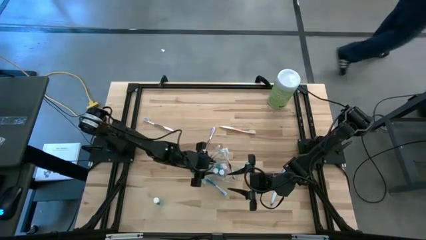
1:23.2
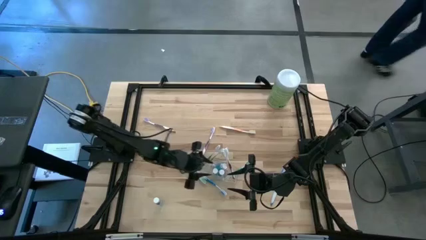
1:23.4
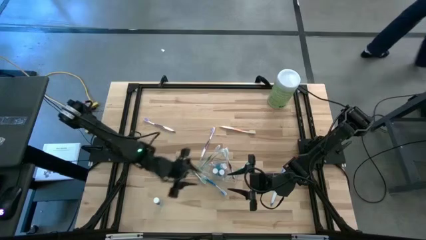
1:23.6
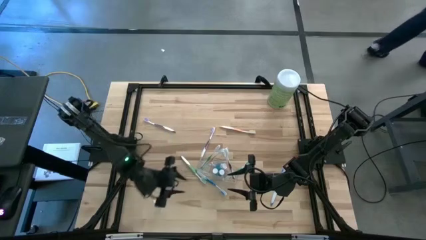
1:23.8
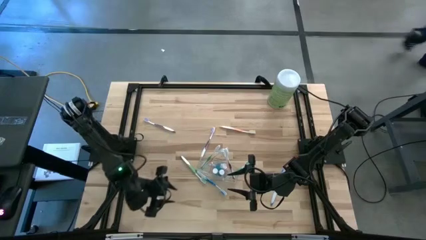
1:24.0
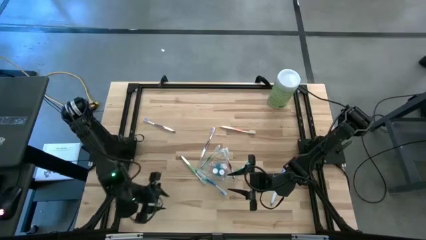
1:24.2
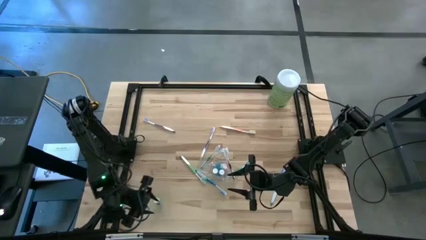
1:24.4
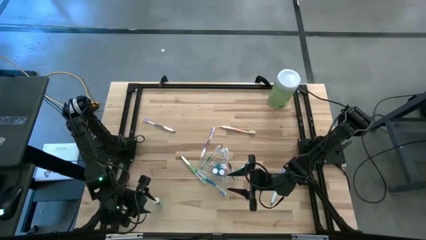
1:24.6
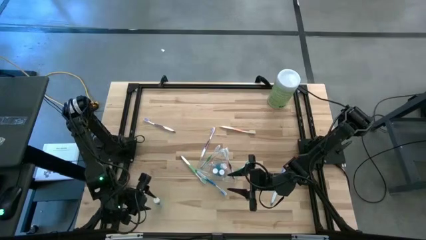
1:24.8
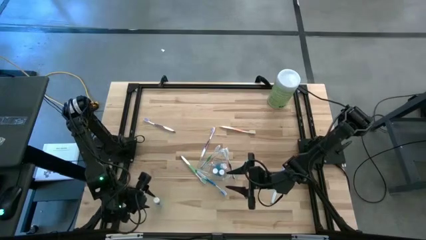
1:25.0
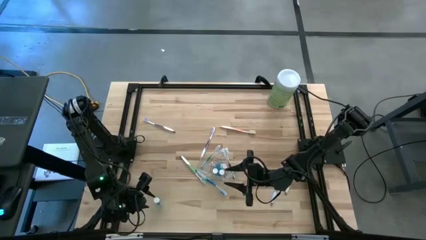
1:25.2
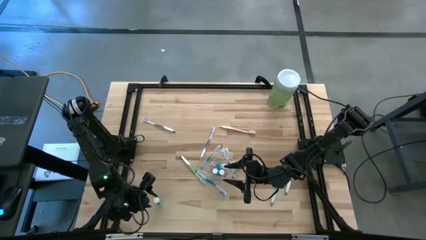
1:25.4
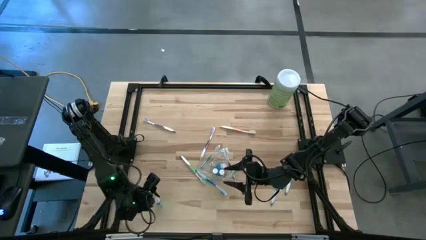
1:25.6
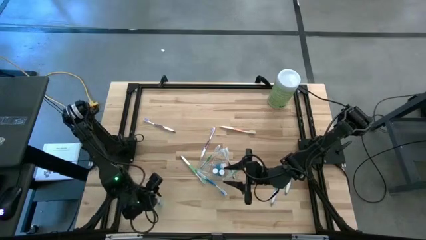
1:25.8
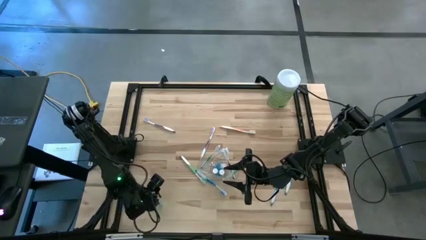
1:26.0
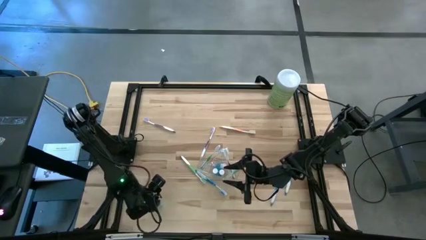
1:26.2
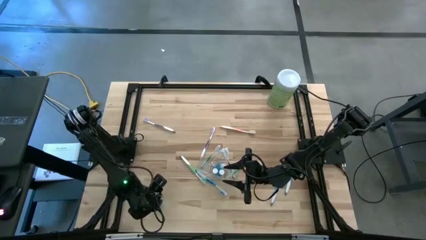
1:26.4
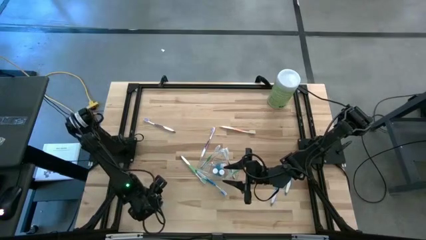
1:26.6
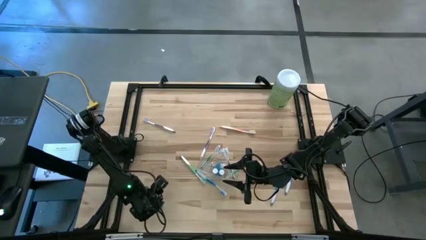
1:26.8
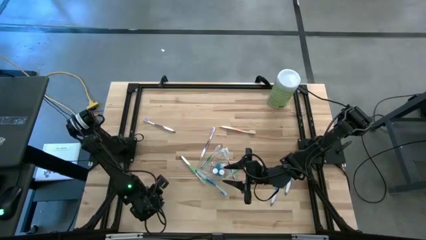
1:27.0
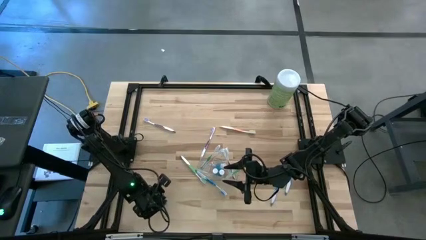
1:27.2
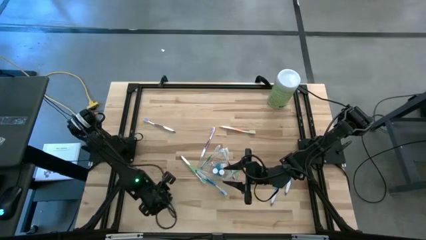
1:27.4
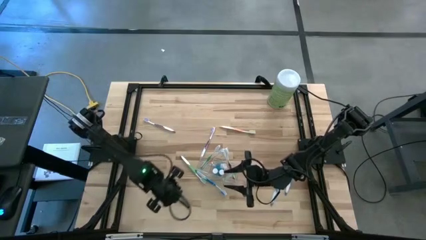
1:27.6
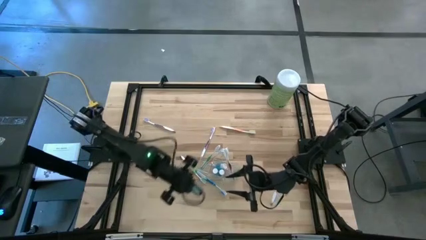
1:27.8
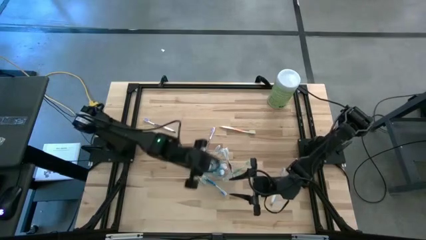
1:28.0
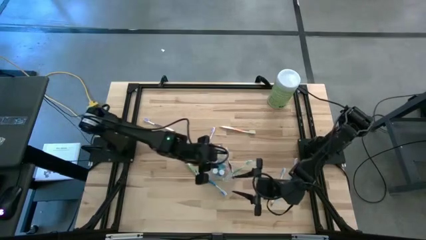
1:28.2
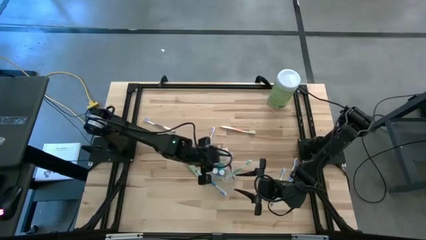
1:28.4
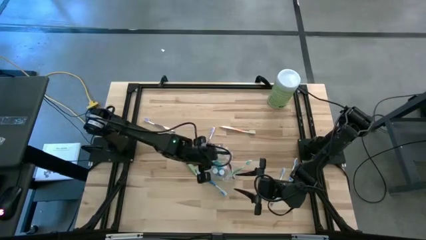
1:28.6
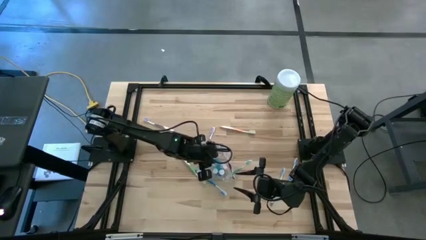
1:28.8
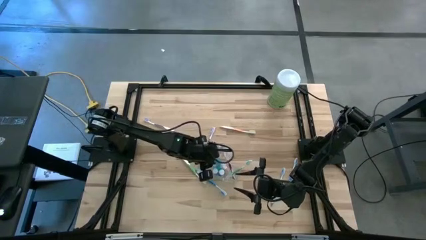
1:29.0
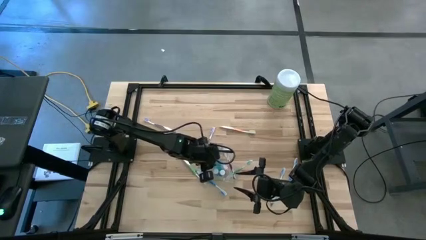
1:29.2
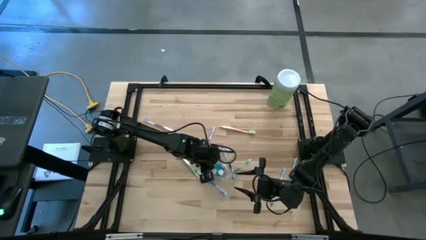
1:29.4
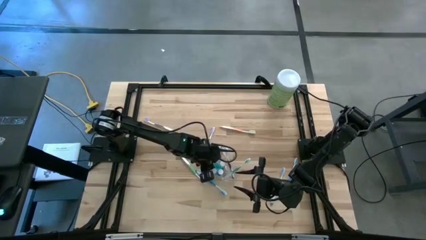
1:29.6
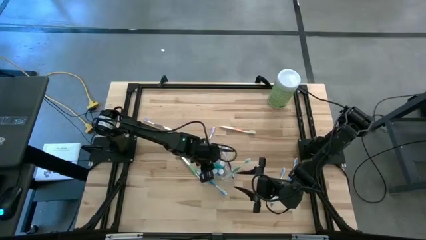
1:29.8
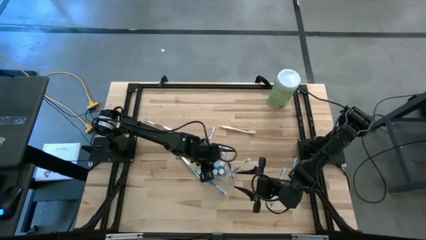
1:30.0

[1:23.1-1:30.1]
Task: Pick & Place toothbrushing station
Put the blue mouthwash into the transparent organizer

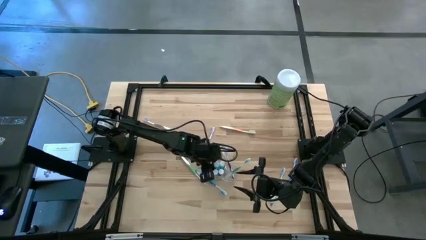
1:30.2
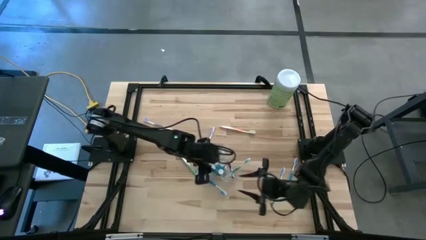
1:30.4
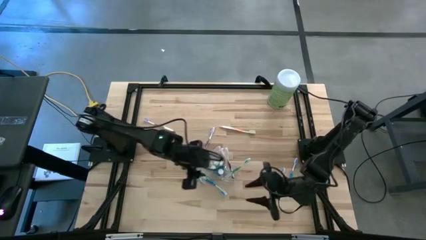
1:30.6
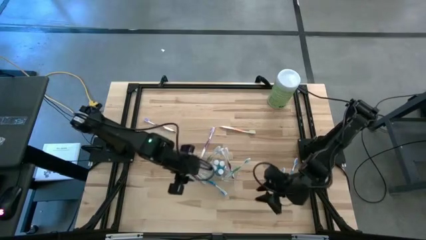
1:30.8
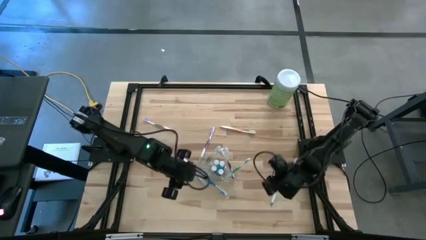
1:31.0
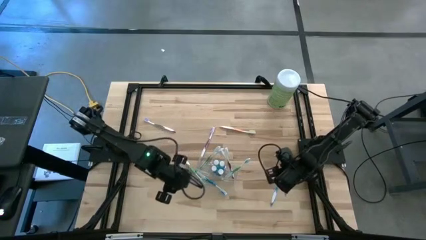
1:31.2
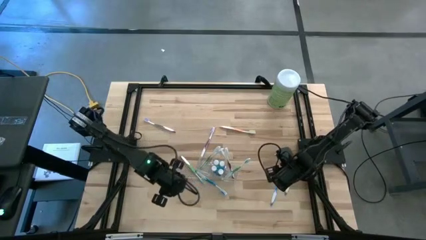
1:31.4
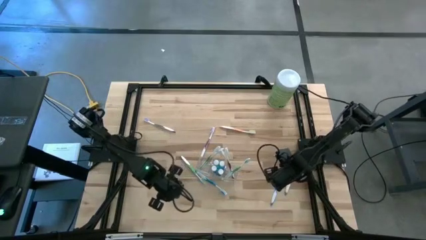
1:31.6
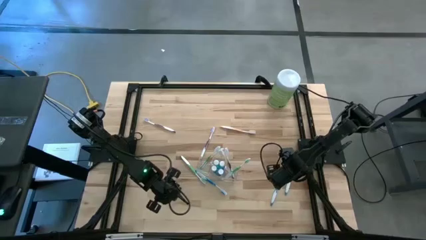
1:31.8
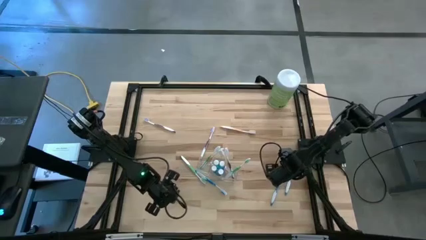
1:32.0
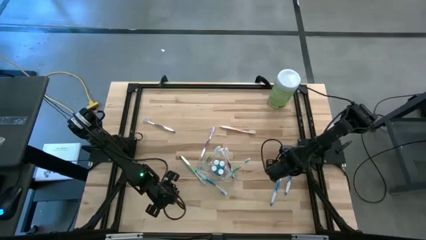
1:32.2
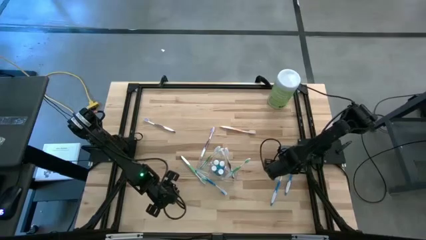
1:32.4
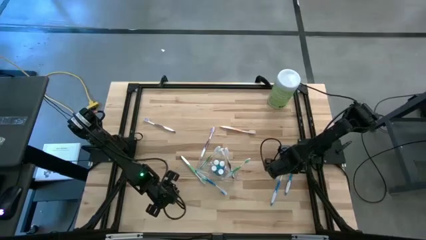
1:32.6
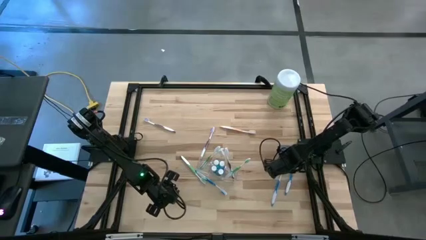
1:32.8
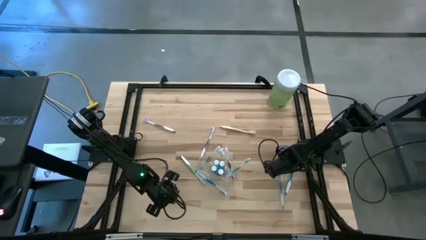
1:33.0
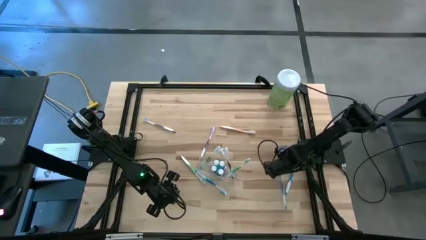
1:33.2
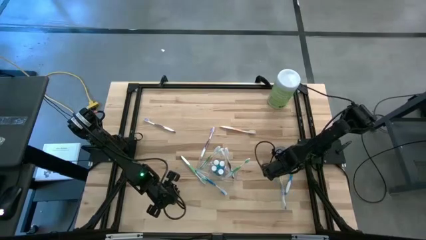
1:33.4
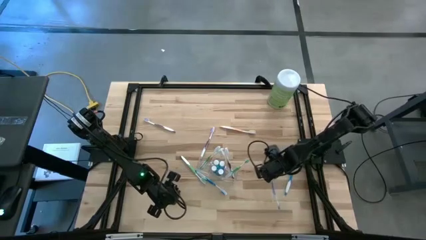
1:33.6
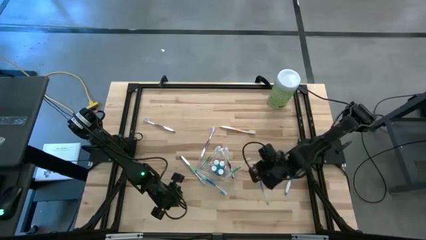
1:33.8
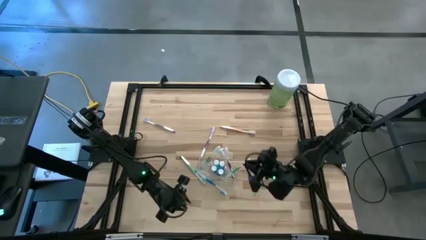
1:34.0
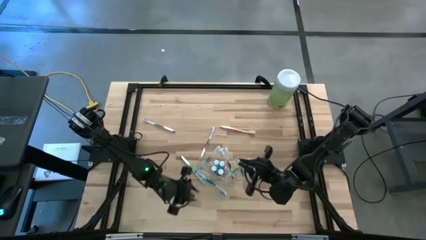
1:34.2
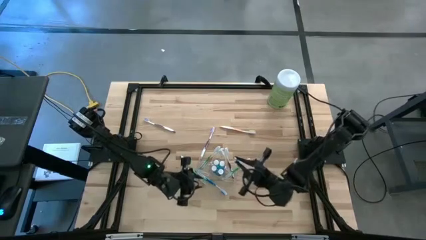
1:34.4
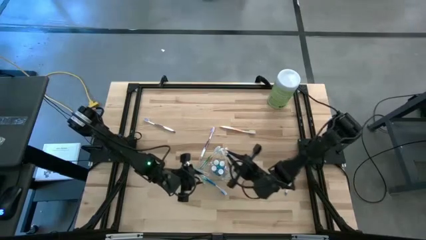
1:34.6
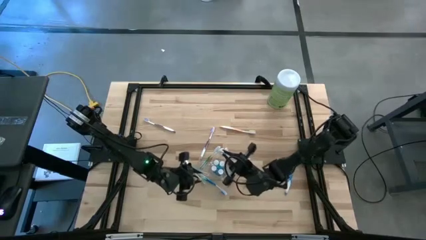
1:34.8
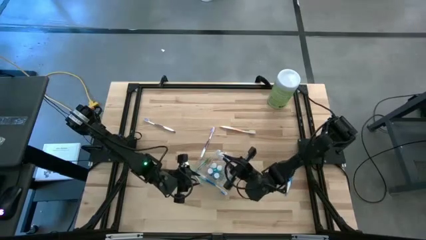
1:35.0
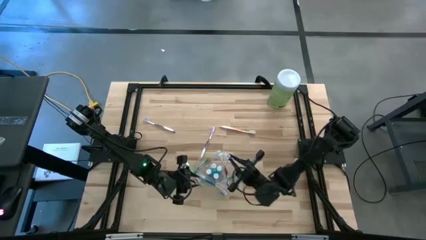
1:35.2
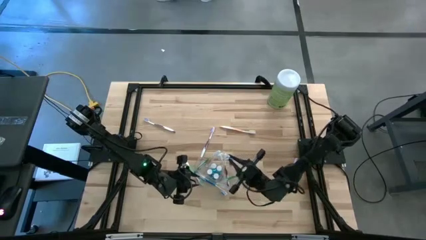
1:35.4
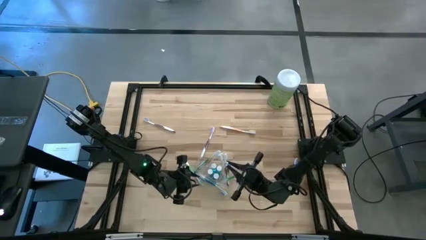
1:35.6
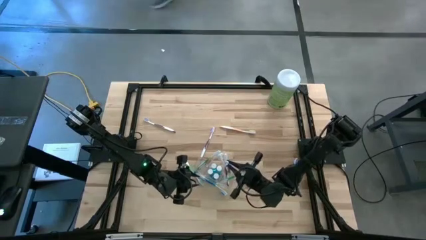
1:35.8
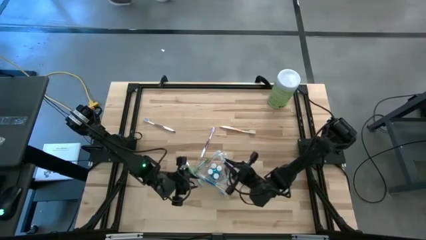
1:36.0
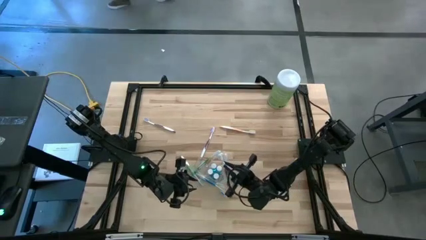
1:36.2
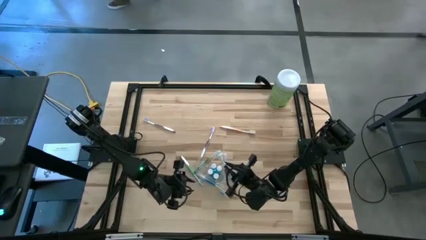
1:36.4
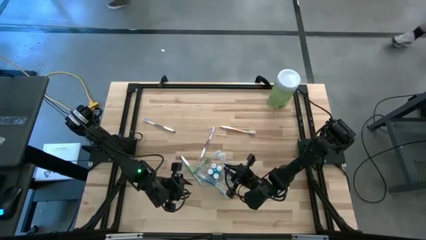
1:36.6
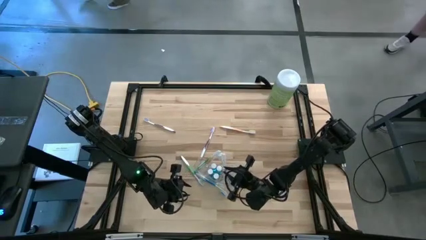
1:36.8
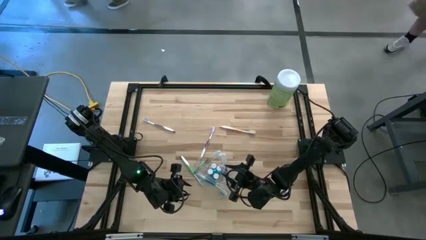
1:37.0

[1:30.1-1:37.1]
Put the blue toothbrush into the transparent organizer

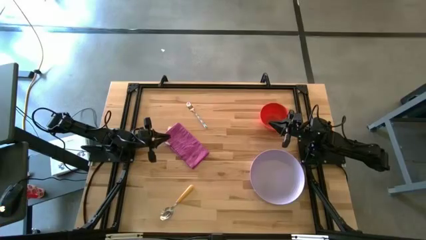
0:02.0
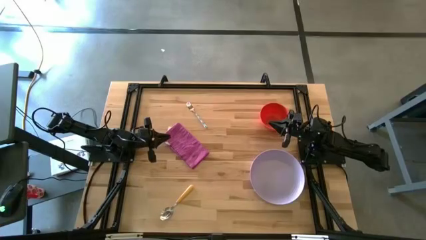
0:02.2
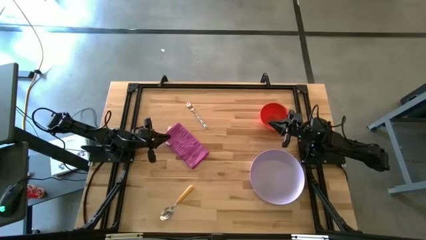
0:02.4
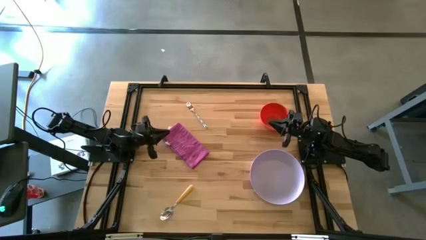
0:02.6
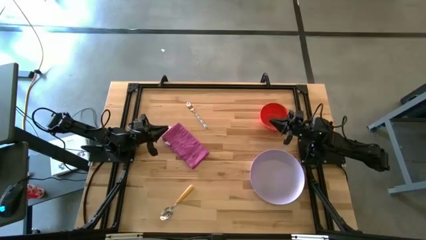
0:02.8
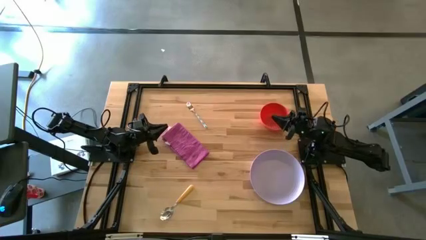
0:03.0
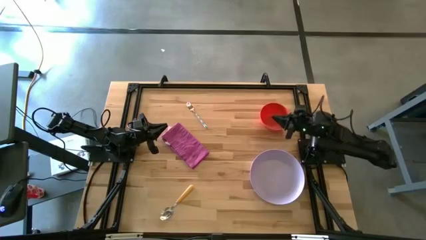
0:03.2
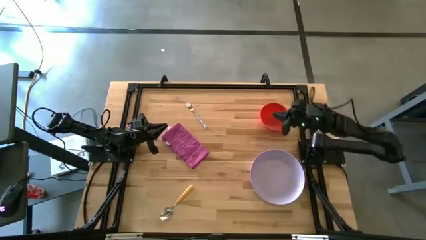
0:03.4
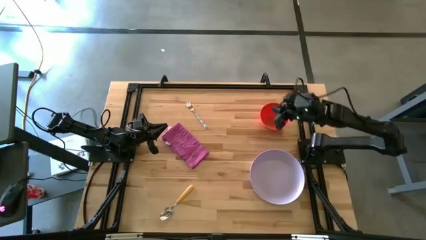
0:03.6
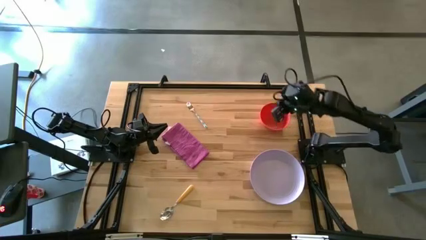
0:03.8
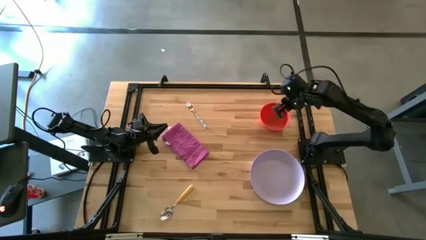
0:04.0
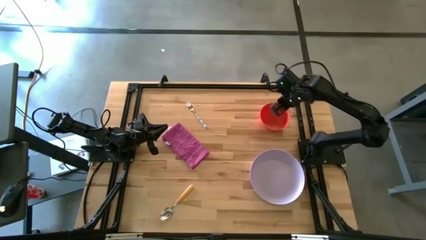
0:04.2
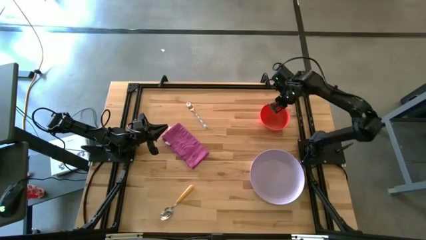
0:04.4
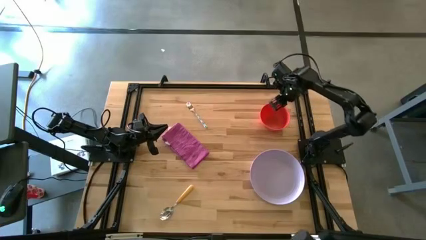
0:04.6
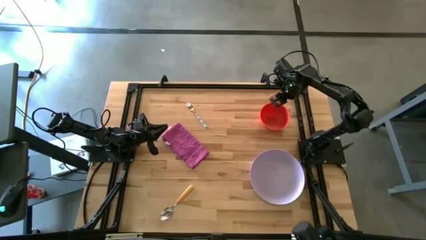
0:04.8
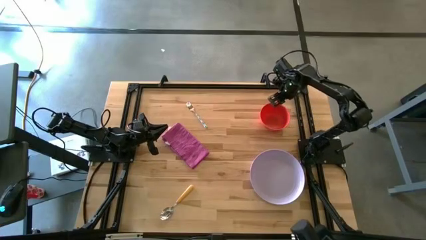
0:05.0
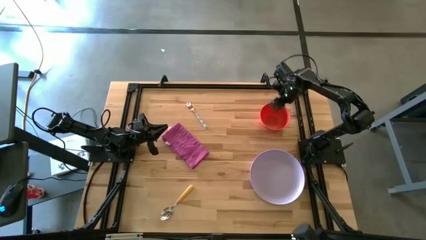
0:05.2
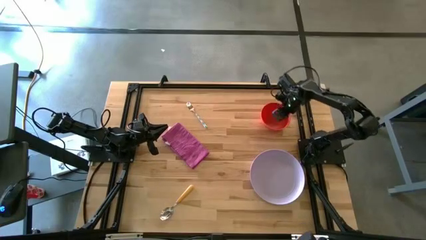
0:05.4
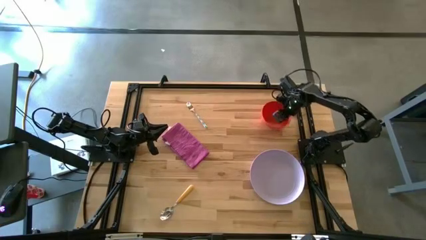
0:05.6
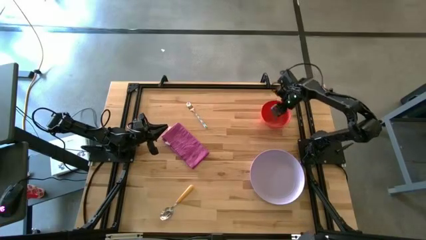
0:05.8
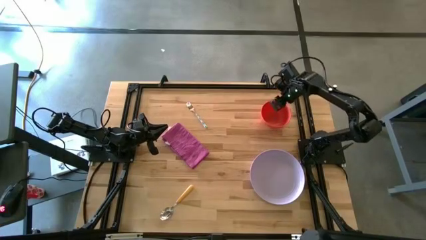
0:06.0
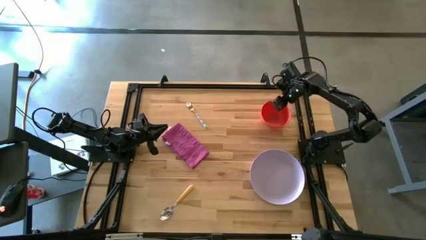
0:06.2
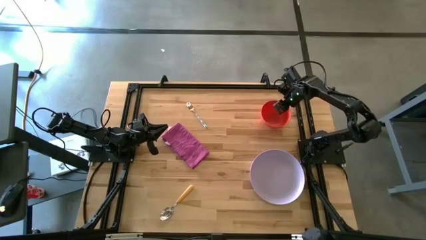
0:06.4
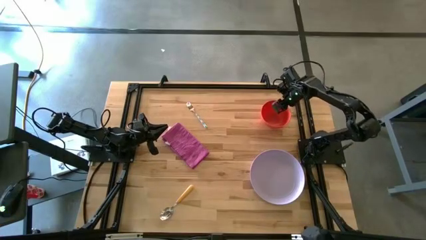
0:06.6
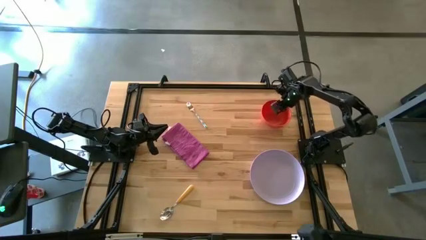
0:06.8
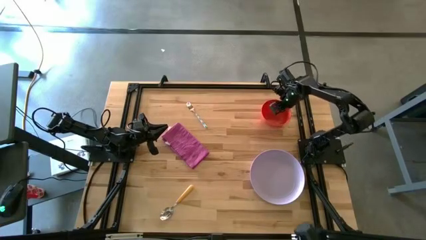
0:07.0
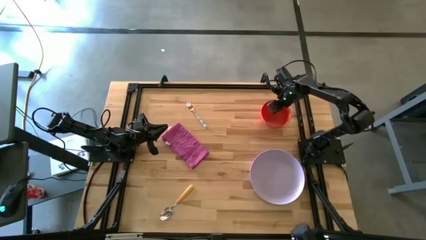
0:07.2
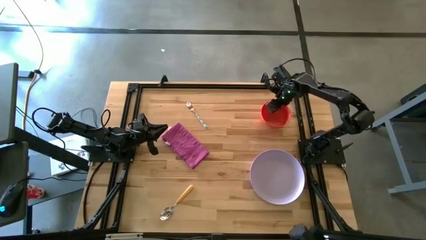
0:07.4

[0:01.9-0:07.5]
Task: Set table place
Put the orange bowl on the purple plate
